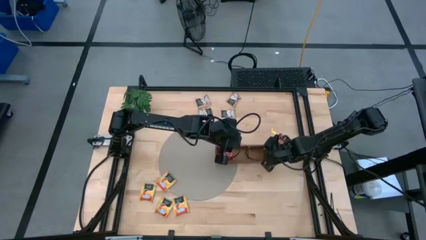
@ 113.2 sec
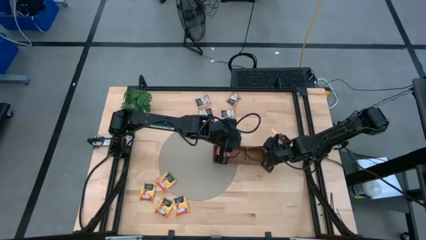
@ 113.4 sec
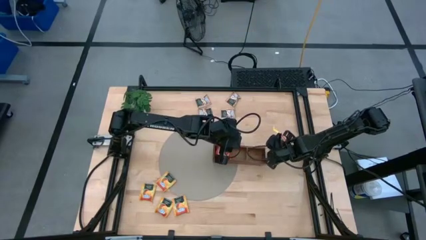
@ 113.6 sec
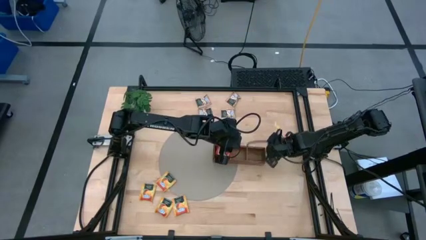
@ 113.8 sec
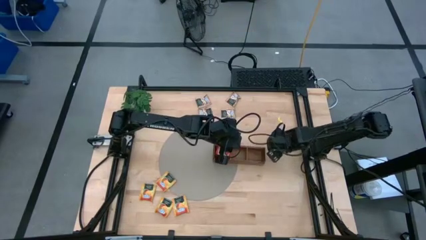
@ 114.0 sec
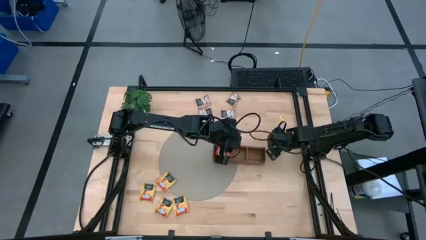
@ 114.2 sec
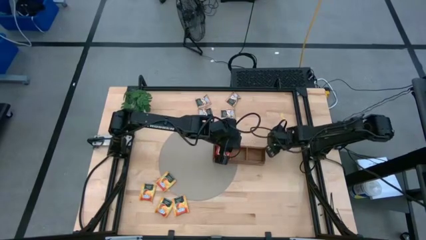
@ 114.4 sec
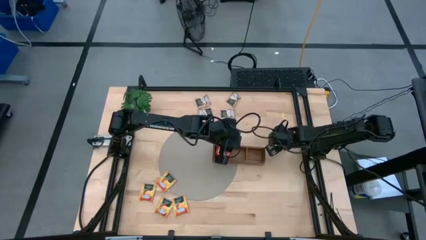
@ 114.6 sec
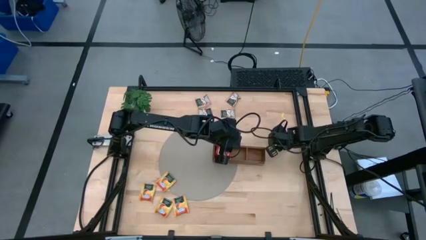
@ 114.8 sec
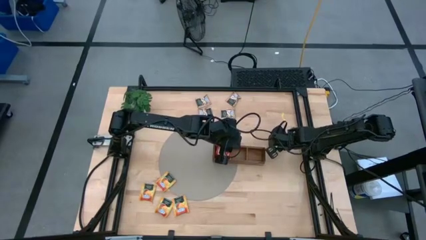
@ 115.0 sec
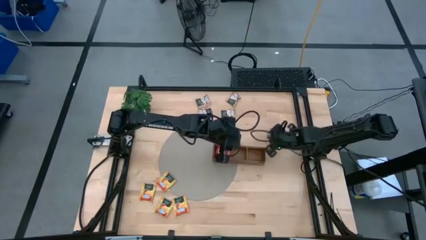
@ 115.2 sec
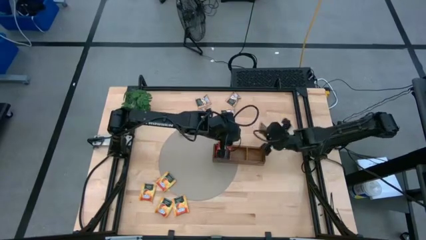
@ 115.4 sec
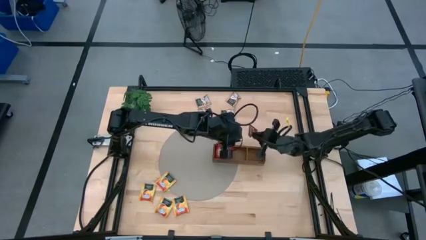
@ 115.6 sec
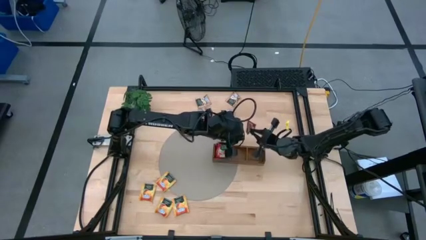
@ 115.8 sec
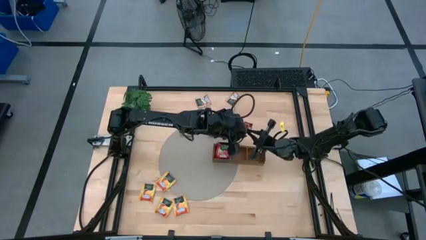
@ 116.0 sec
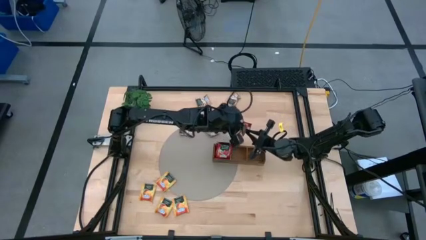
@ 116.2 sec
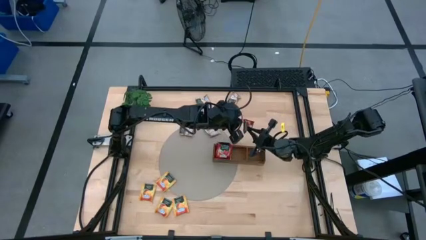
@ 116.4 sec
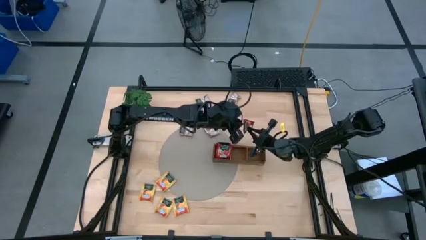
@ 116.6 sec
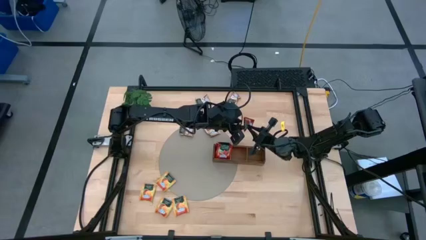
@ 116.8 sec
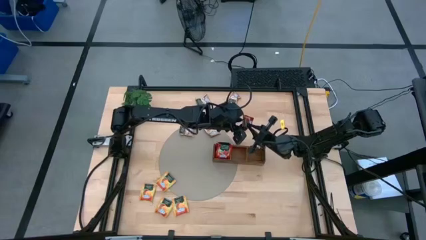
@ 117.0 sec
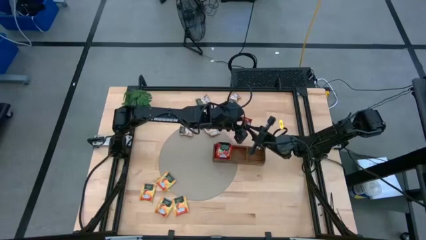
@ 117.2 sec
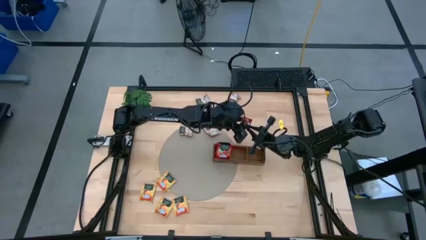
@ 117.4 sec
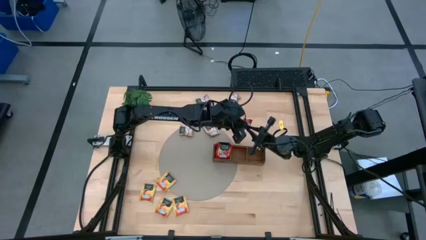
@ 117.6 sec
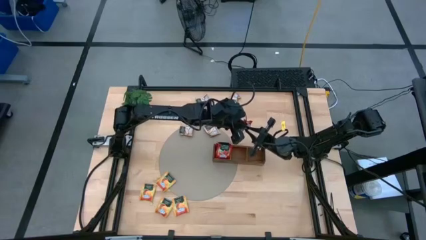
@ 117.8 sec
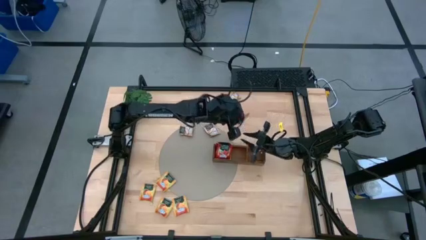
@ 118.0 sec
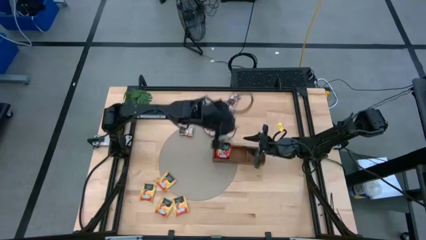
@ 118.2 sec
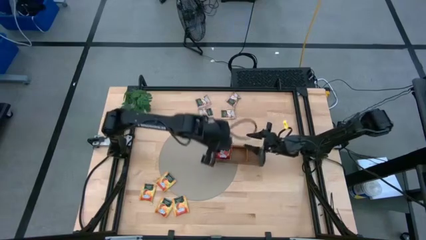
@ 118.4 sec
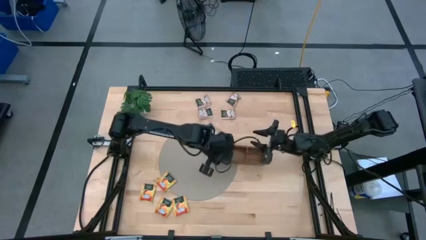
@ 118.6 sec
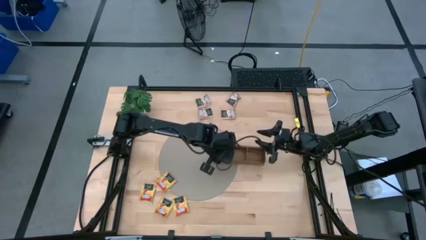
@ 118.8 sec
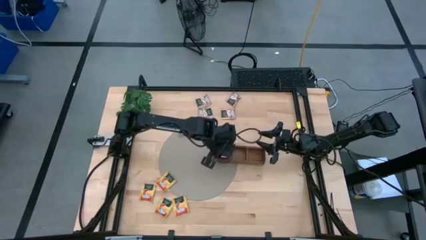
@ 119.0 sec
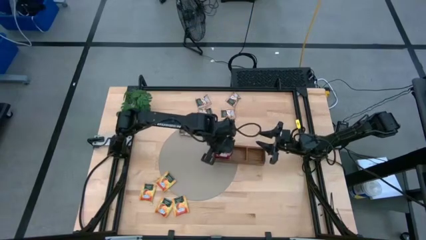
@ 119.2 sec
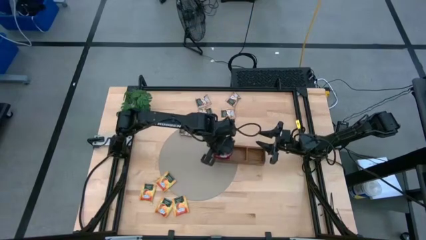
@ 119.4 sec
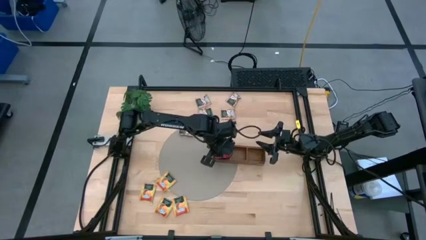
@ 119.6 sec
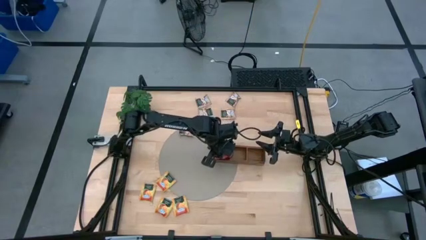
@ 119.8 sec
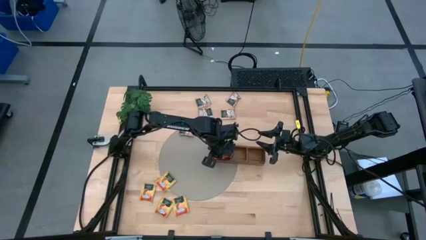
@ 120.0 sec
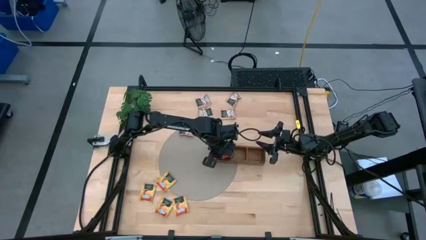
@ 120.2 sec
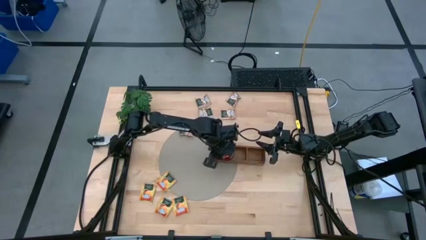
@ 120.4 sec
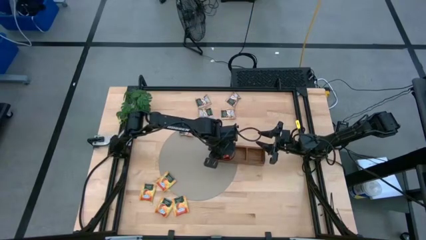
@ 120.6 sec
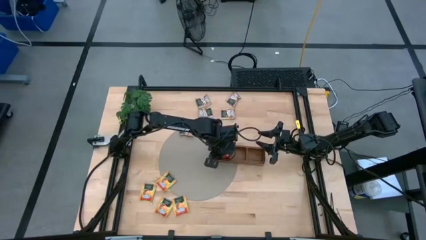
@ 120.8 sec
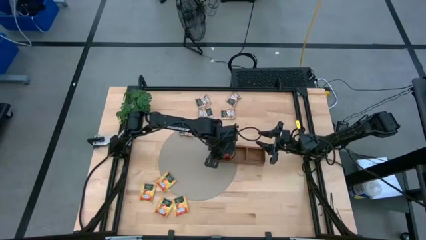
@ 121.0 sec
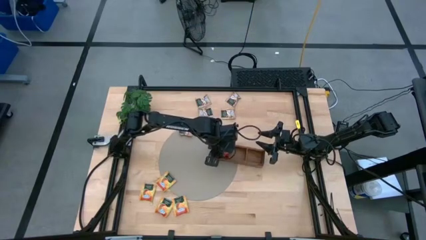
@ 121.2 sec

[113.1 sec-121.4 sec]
Task: Pick & Place Tea
Put the red tea bag into the left section of the wooden organizer

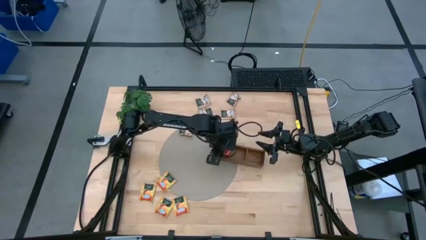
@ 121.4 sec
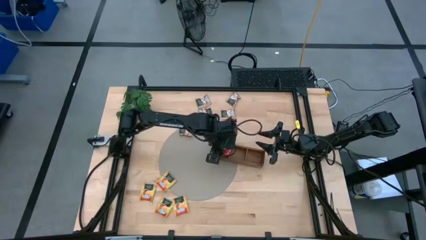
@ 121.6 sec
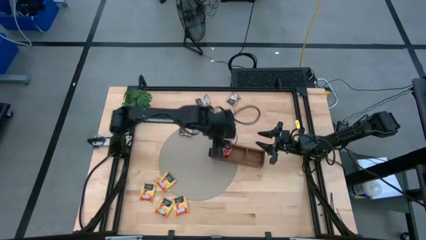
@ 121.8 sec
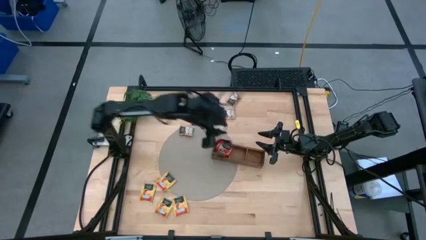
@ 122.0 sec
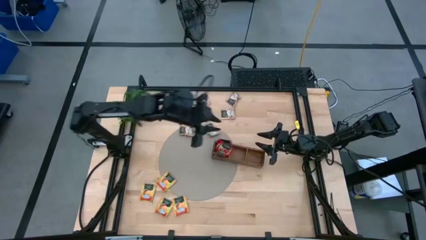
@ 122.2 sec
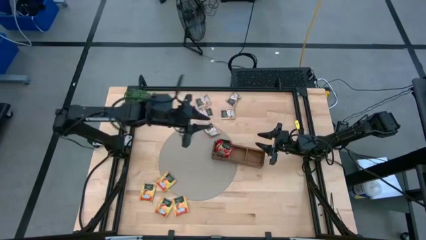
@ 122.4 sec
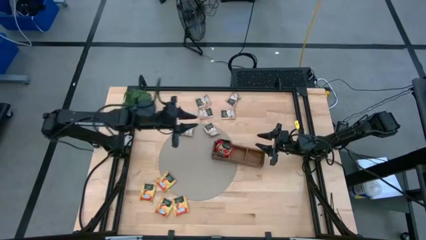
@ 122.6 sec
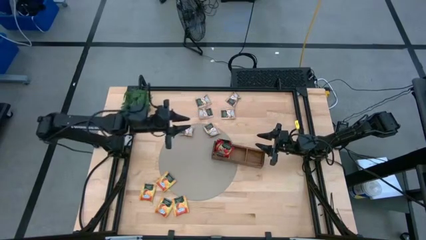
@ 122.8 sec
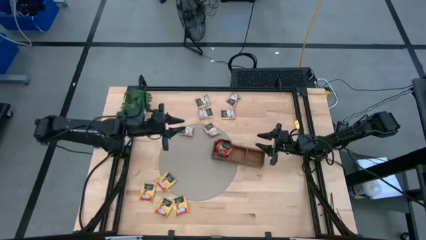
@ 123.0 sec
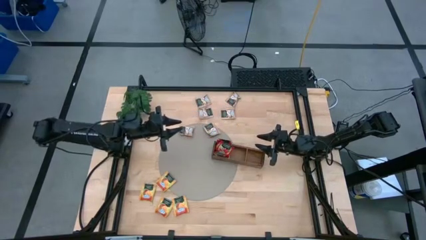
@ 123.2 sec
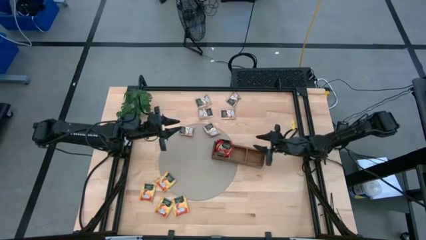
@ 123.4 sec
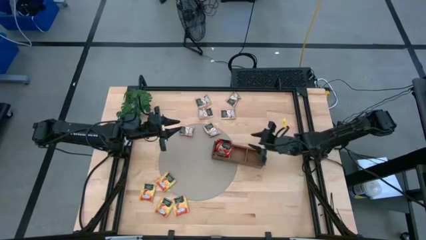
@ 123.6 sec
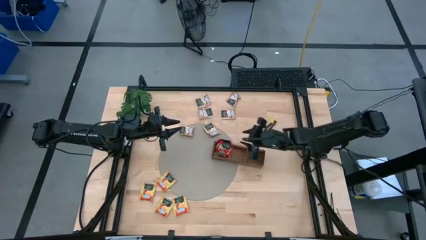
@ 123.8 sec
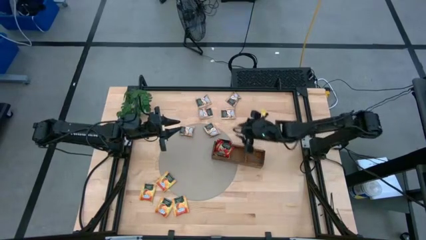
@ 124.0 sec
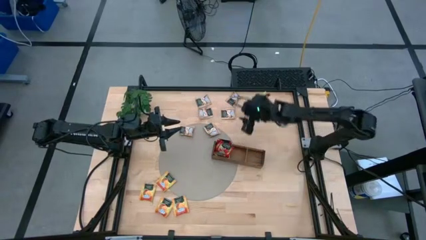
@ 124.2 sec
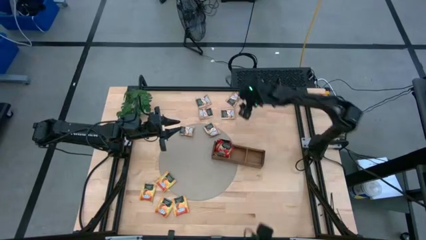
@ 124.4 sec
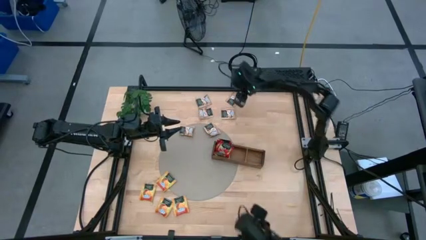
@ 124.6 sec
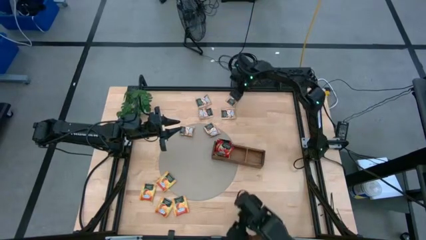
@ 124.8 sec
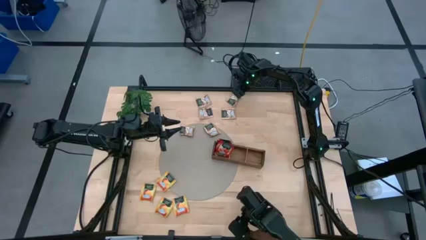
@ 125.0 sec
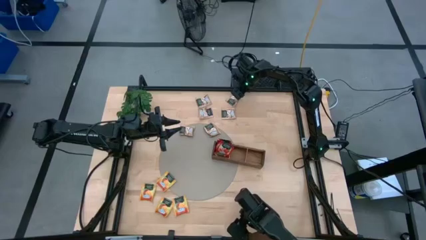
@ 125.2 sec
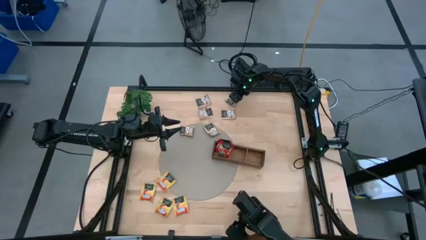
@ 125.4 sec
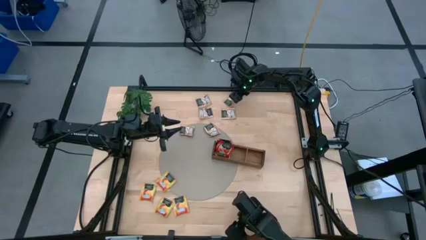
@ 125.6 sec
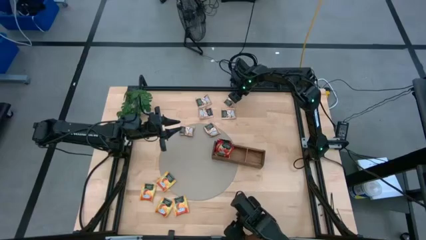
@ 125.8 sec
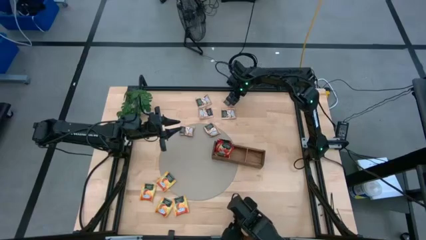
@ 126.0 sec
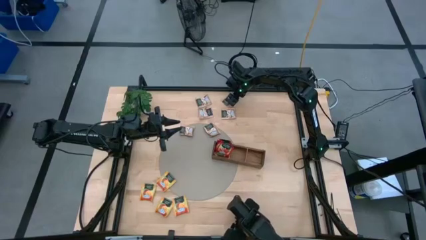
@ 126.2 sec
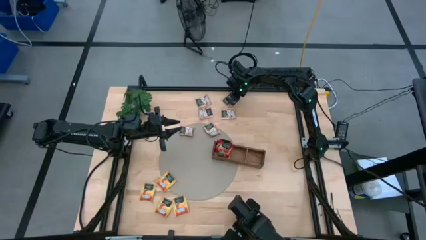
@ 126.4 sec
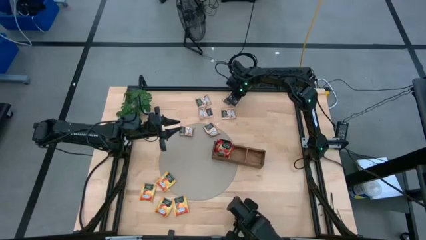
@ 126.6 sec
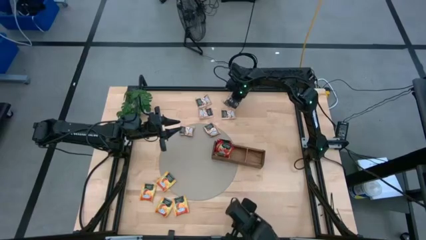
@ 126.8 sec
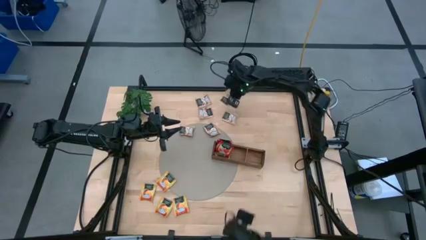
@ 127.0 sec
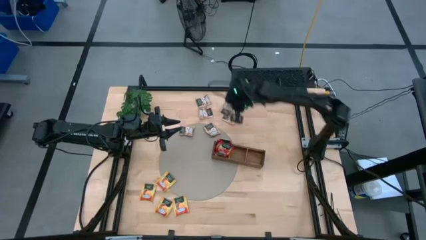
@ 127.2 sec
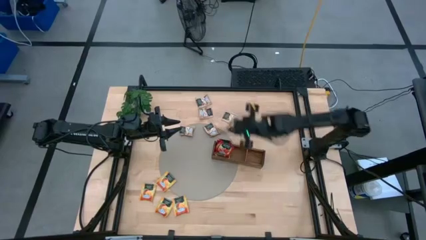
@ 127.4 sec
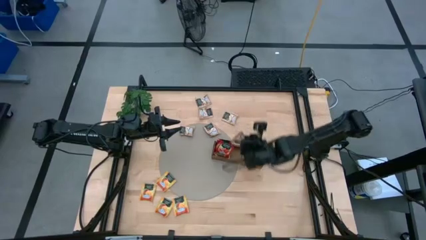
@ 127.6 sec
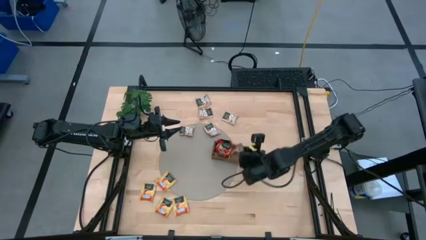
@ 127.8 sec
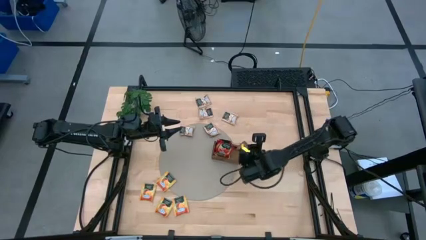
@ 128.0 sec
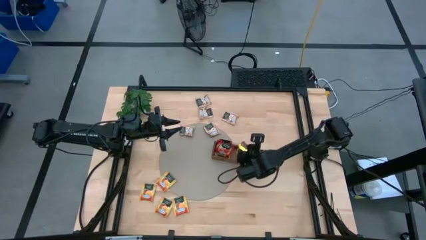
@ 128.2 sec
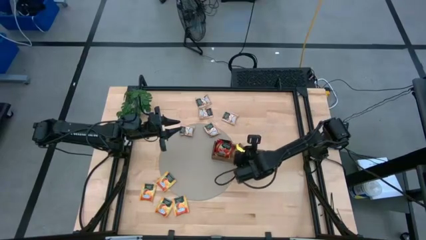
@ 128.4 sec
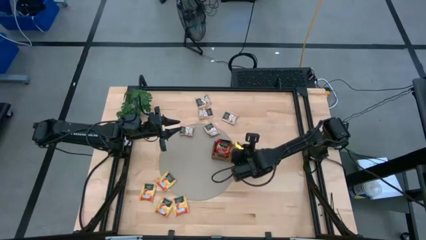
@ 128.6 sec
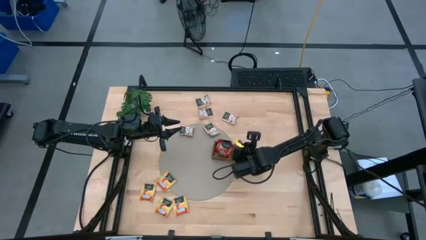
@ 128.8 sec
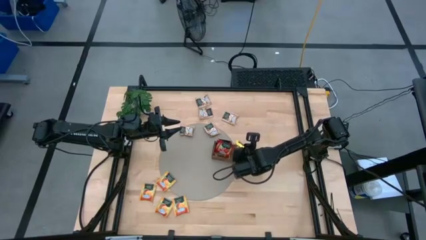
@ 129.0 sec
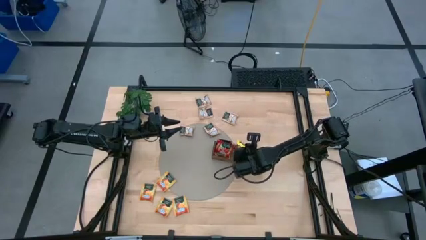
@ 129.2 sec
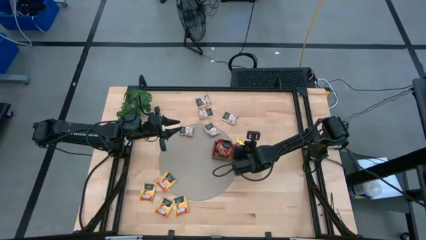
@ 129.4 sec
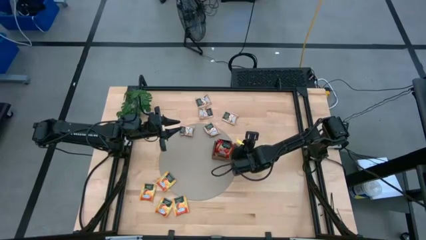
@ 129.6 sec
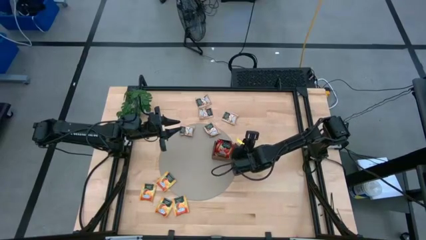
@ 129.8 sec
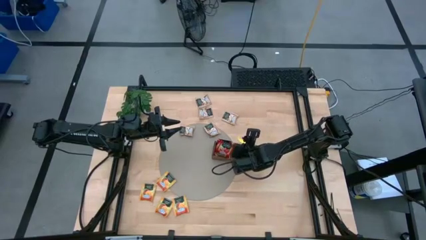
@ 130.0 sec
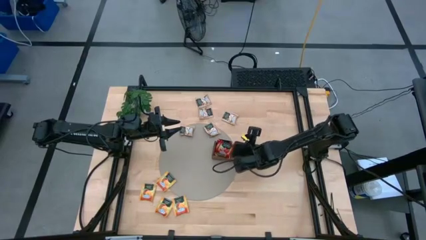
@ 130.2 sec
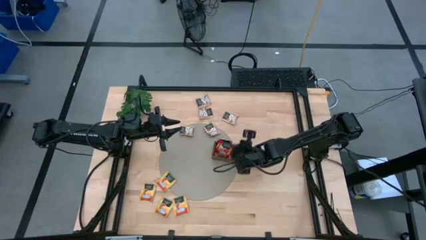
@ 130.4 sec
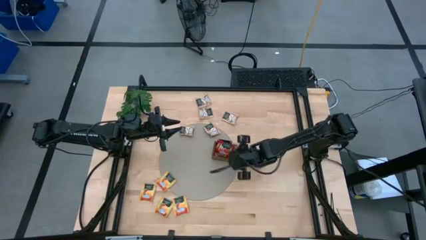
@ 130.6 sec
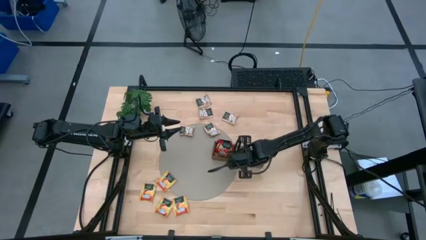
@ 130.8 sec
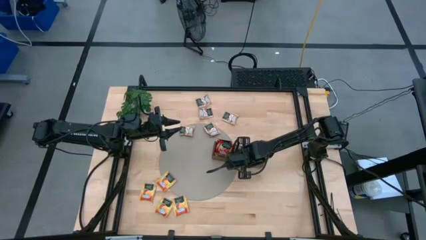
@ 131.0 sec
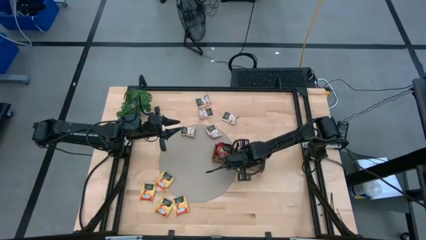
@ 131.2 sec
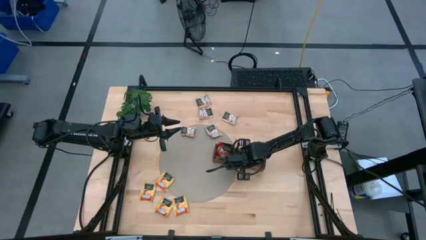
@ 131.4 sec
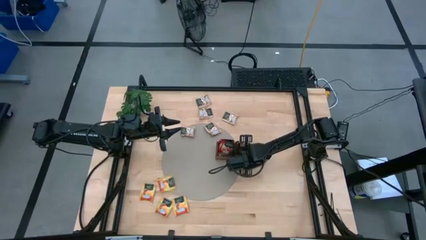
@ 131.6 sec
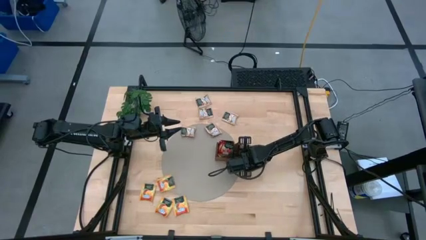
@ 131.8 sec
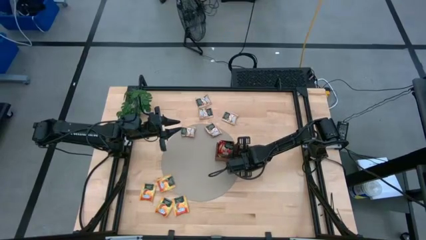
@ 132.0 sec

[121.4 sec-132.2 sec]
Put the brown tea bag into the middle section of the wooden organizer
